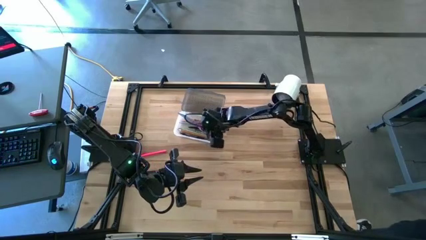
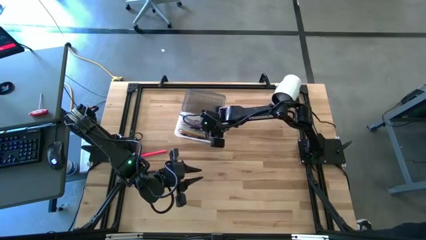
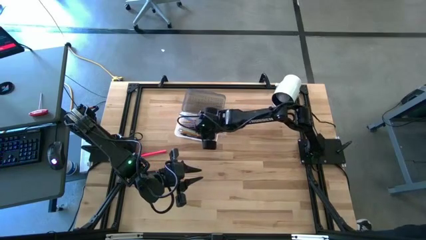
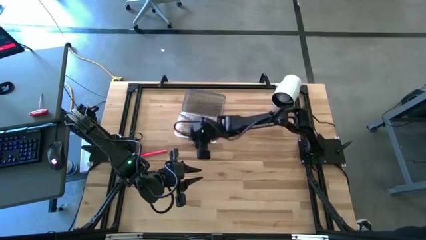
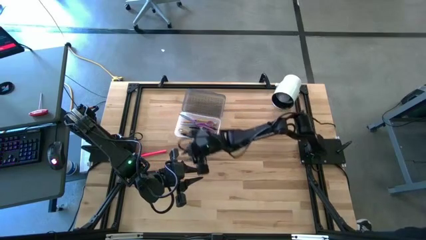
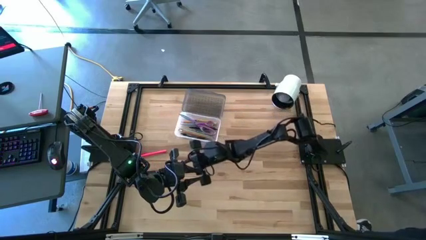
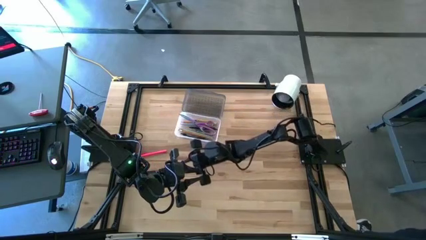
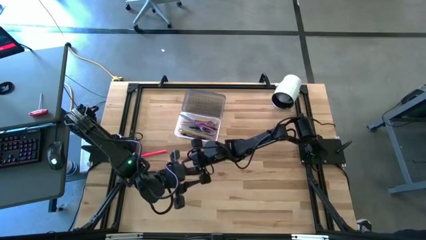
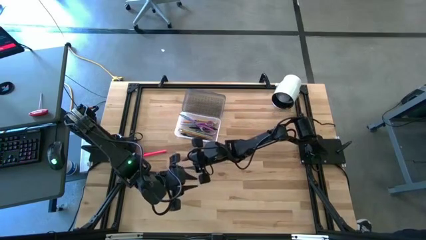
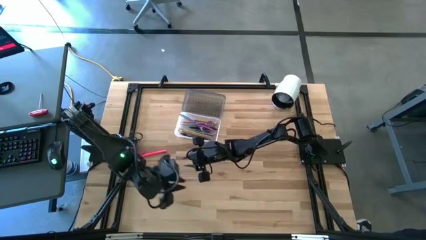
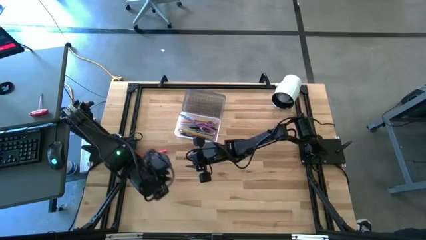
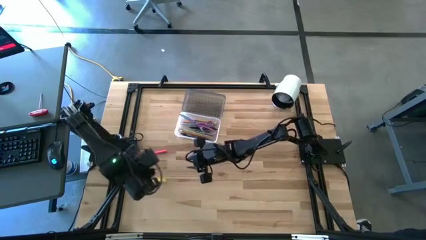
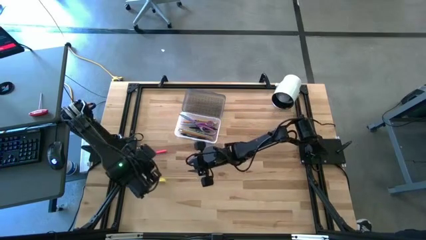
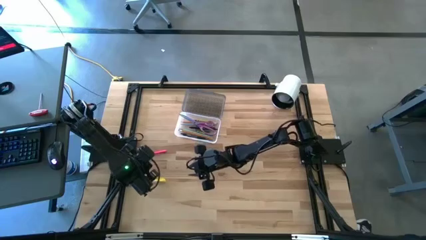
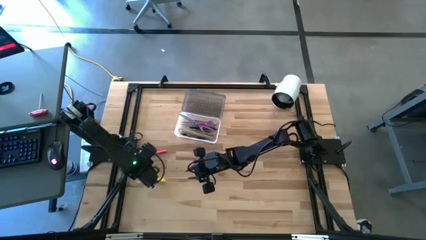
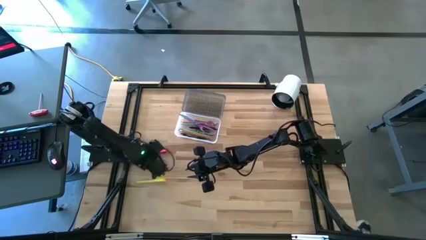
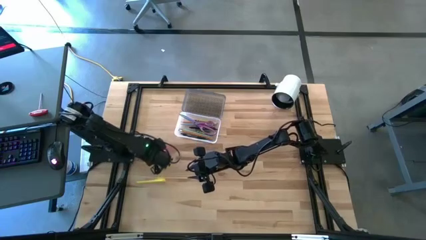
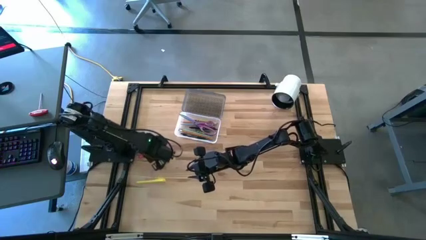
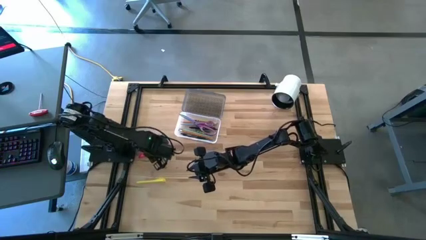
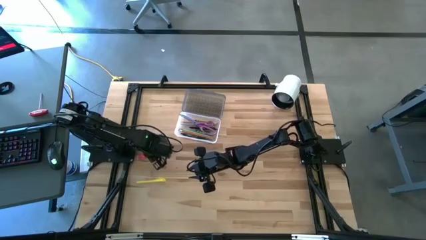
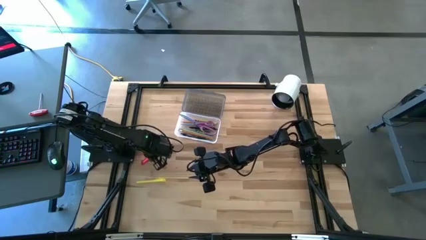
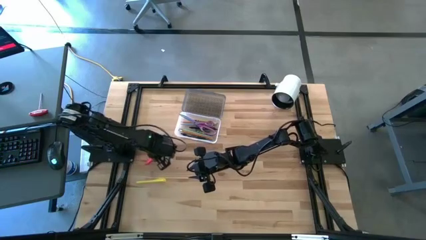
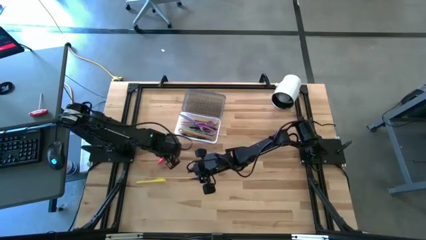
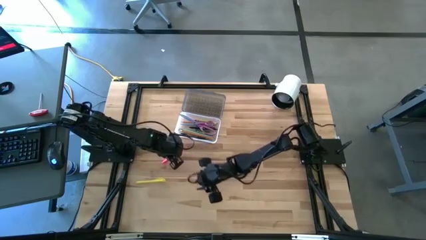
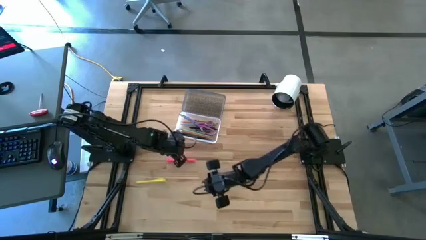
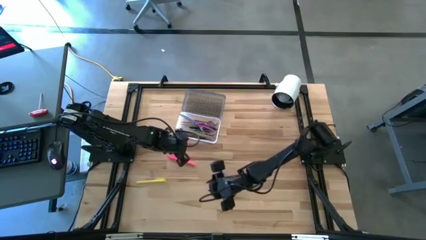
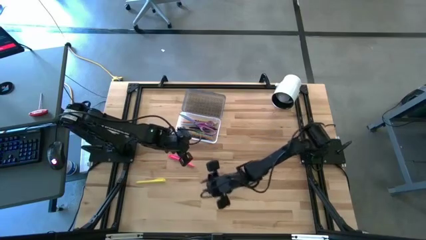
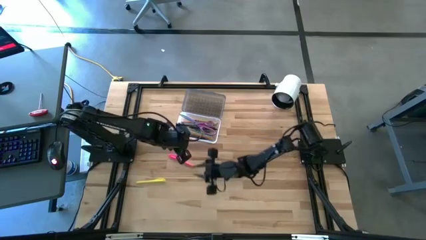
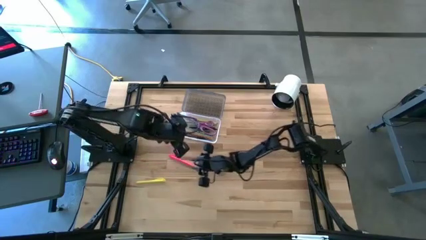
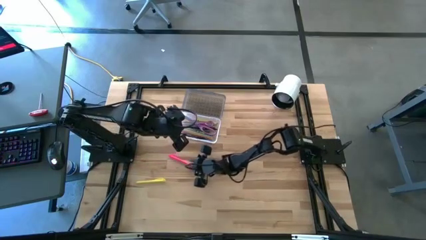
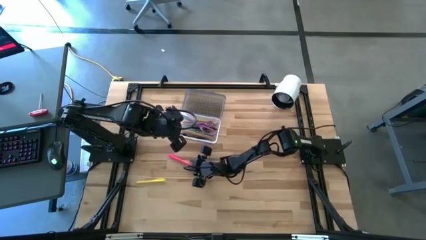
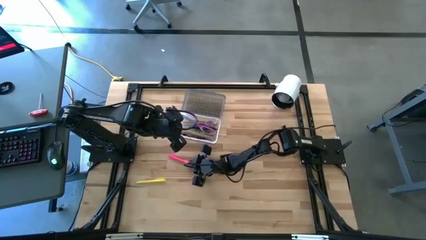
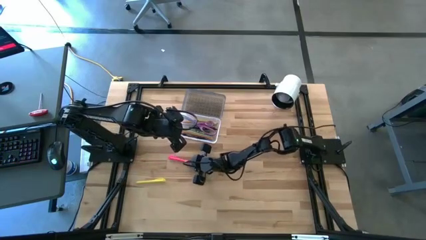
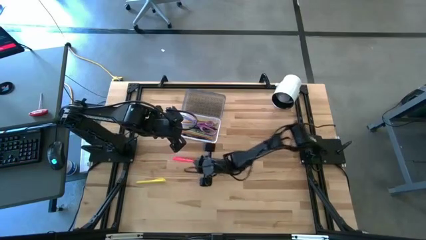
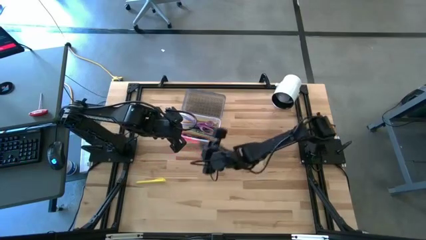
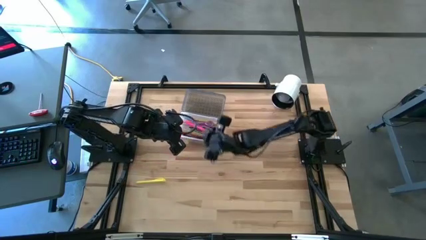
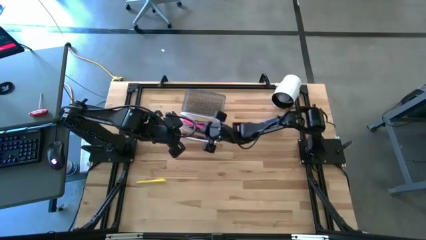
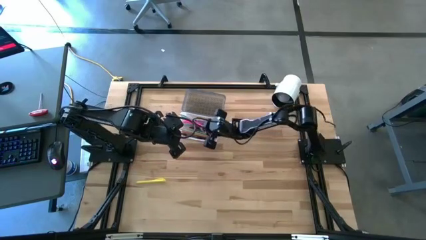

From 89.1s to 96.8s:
Task: Pick & place school supplies into a supply box
Put the pink pen into the black supply box

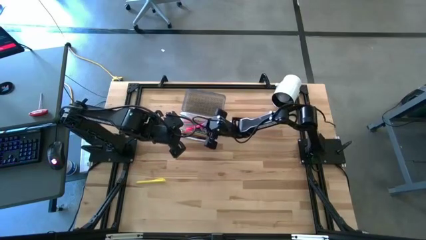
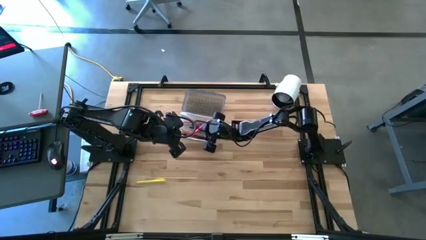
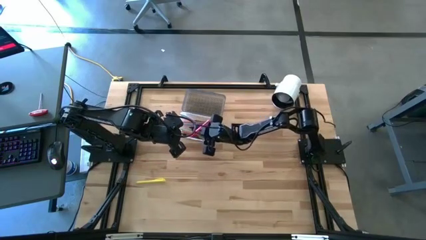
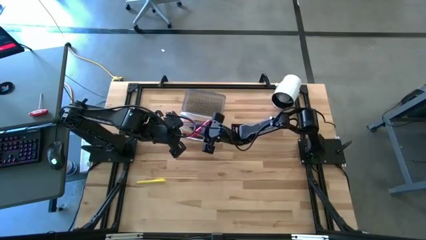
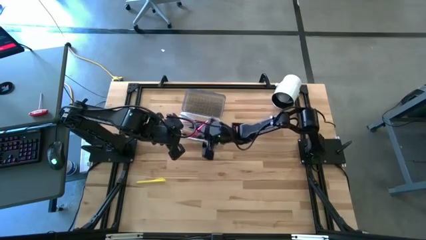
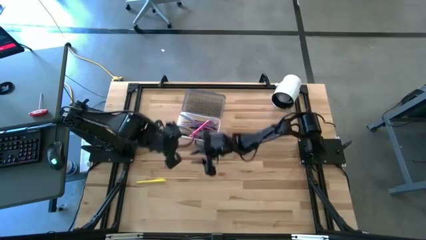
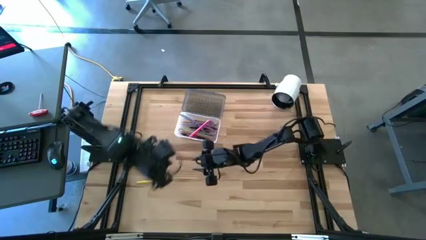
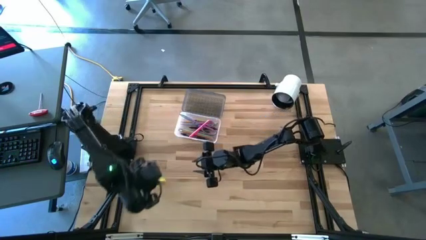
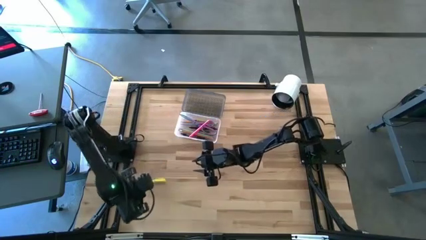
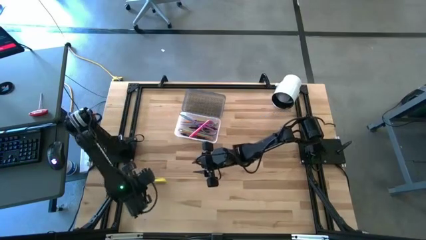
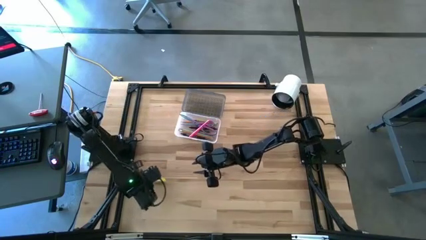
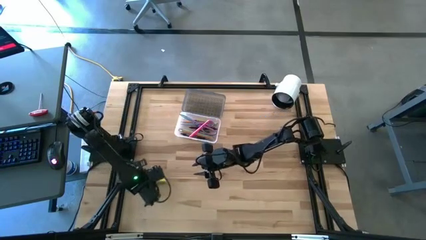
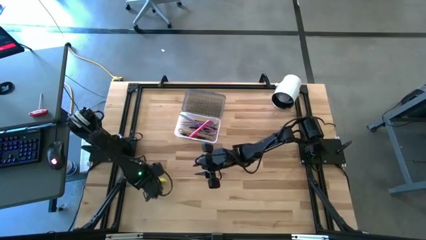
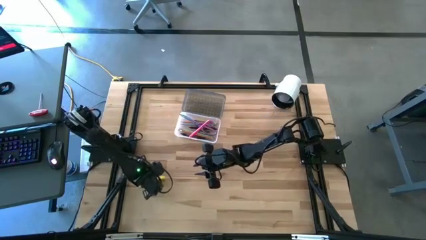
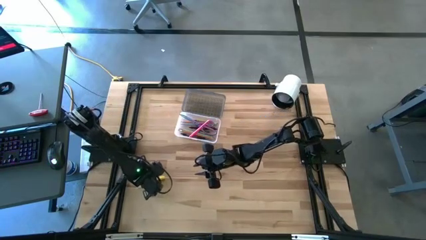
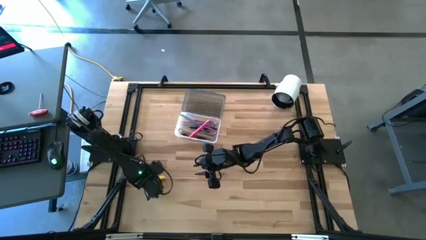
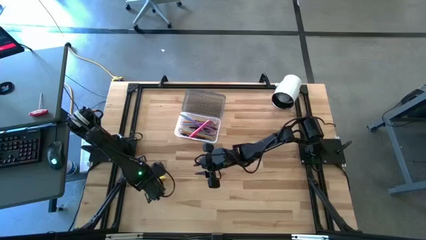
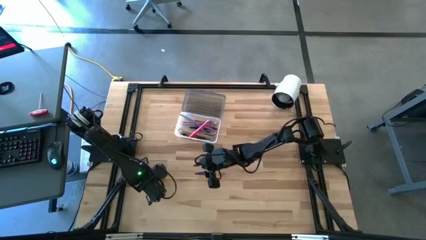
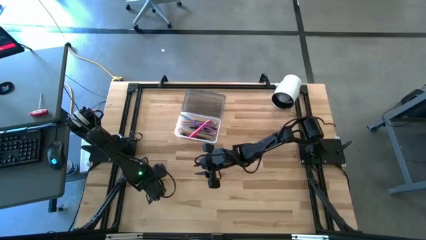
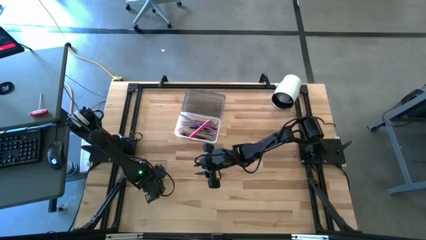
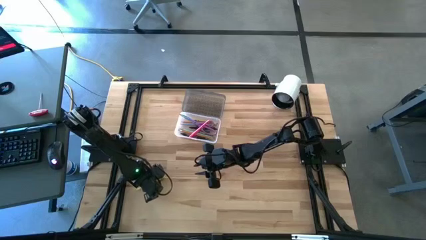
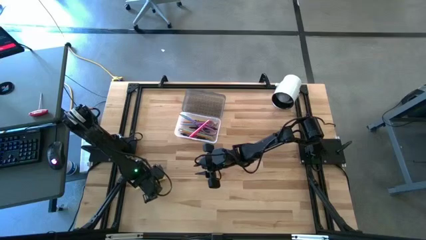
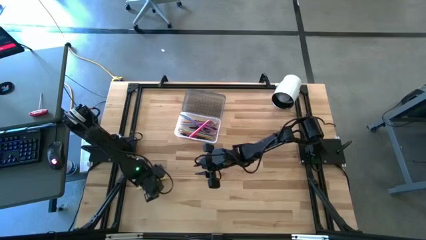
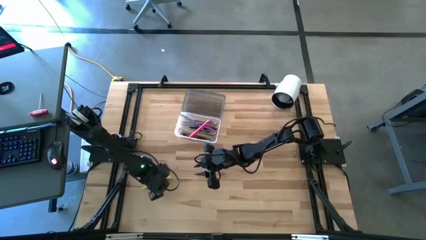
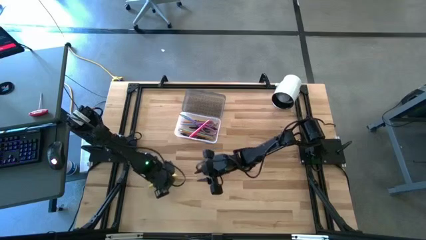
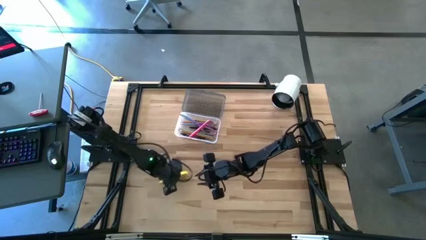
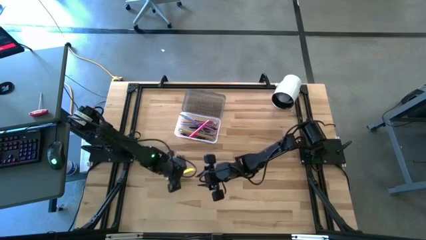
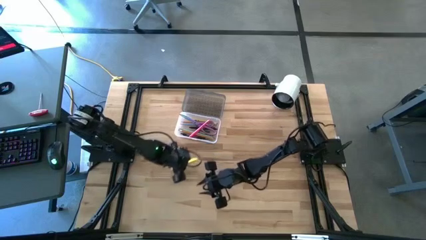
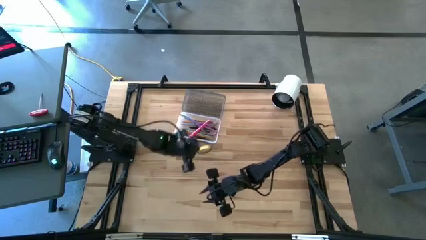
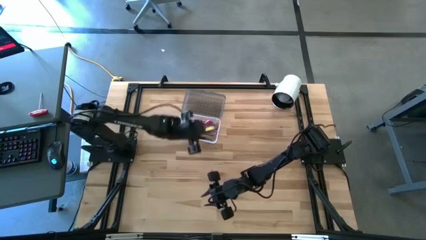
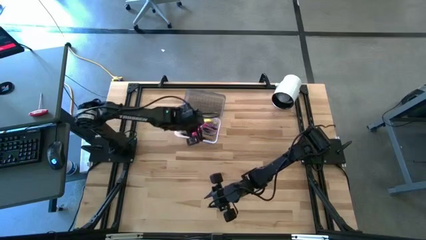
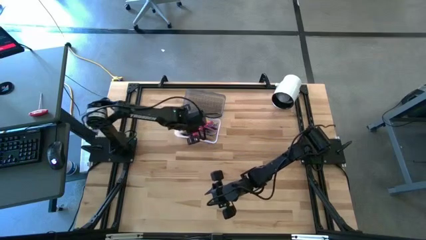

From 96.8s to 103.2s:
Put the yellow pen into the black supply box

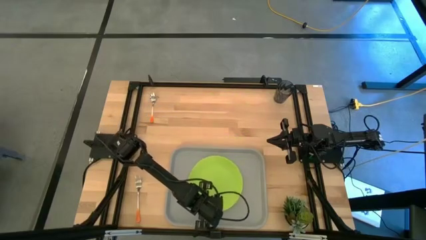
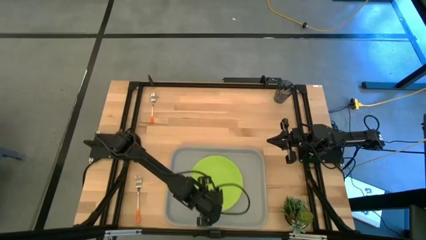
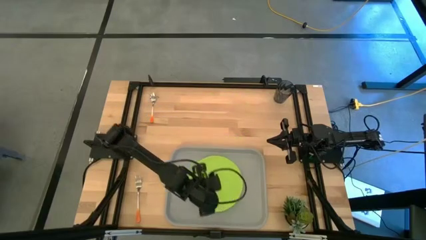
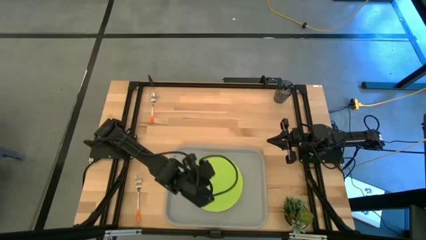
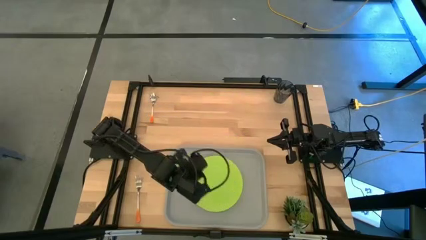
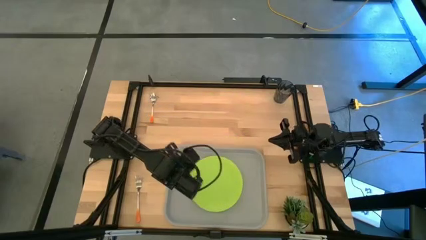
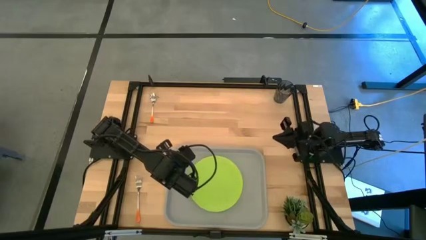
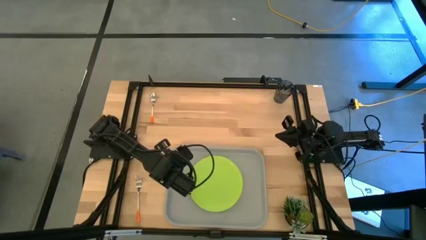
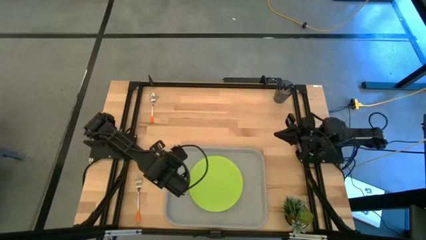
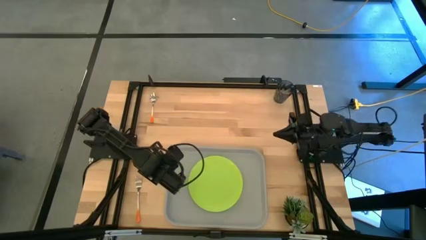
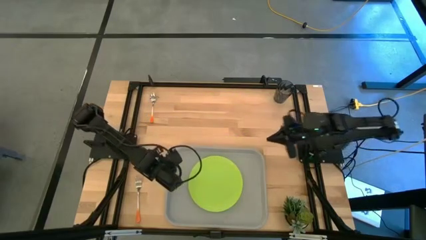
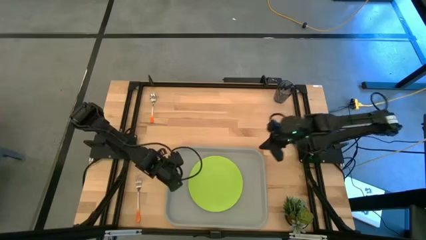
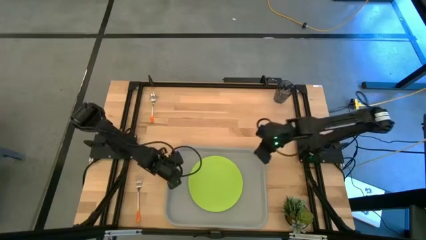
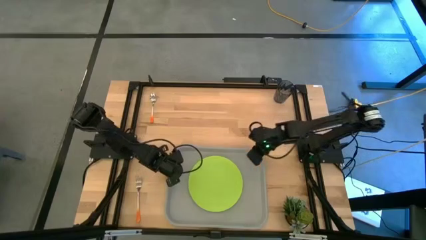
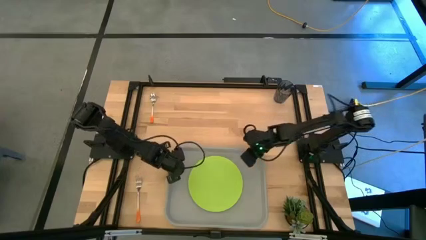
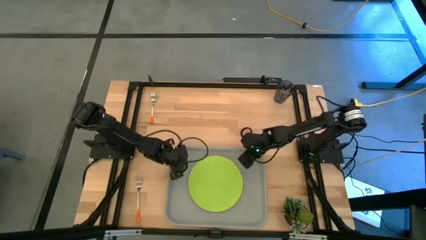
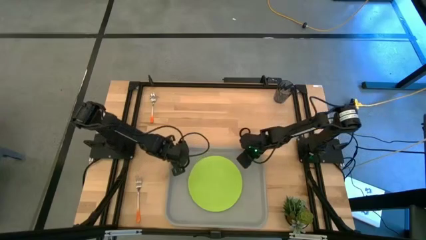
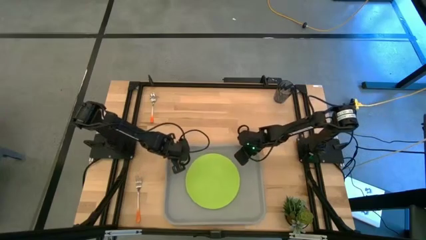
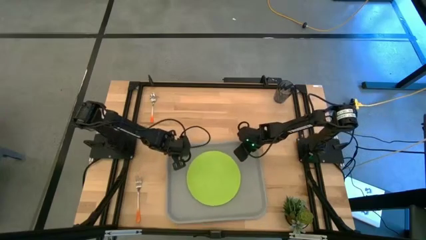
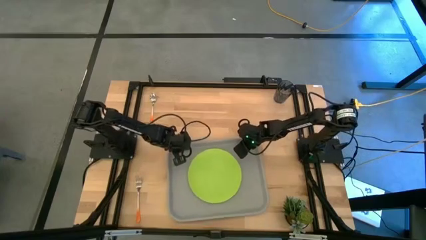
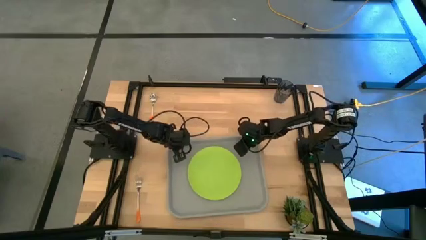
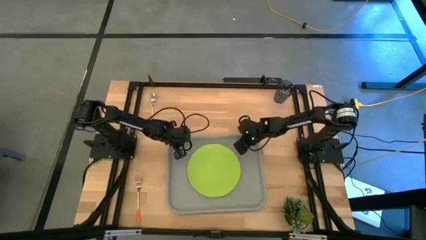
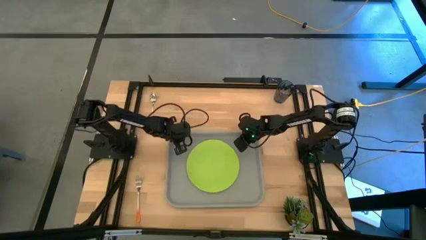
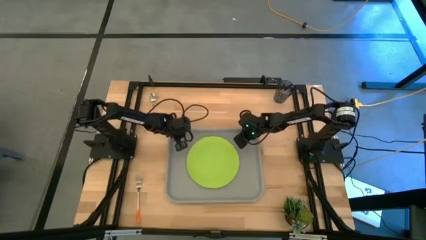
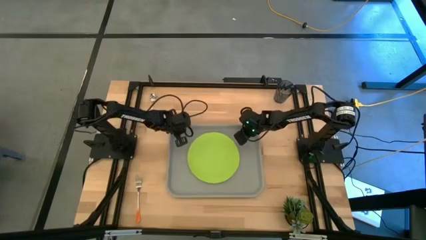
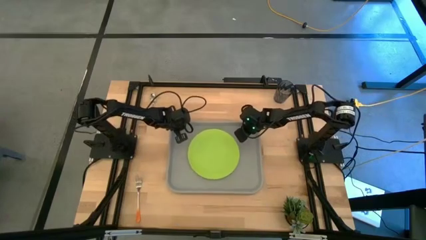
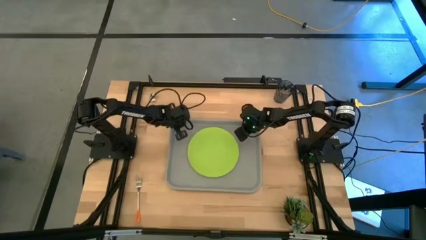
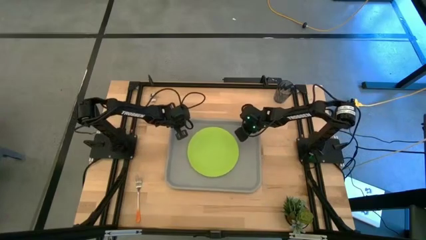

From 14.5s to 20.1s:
Task: Pick and place plate/cup/fork/spoon on tray
Move the gray serving tray to the center of the table
